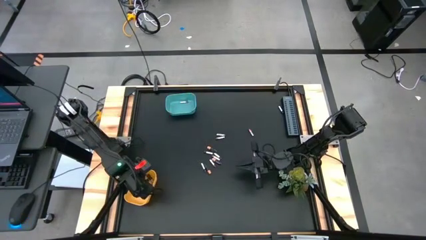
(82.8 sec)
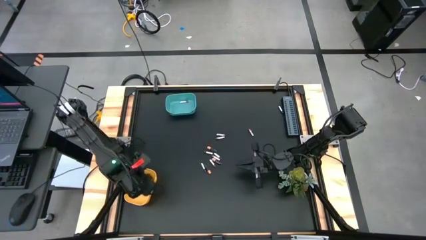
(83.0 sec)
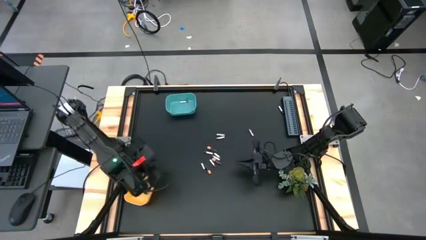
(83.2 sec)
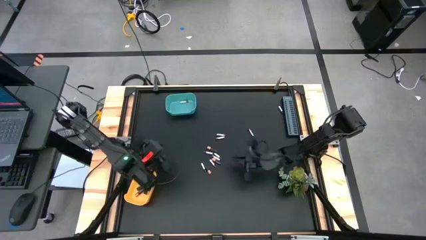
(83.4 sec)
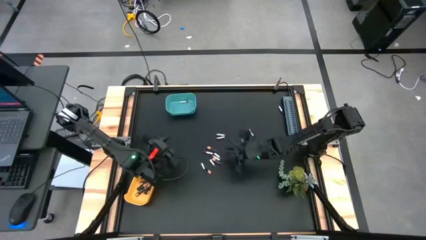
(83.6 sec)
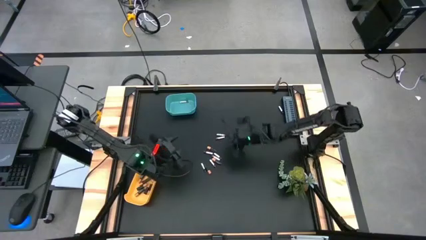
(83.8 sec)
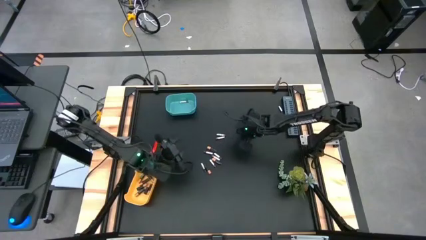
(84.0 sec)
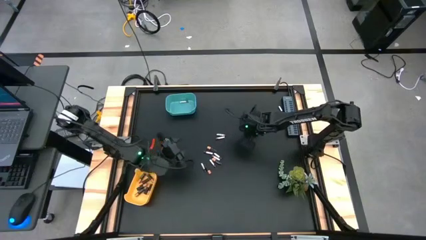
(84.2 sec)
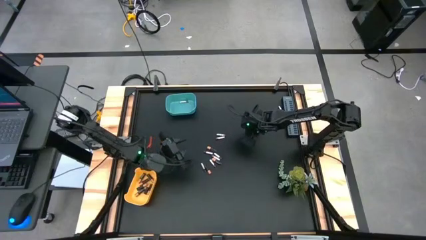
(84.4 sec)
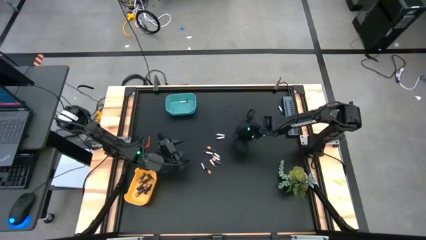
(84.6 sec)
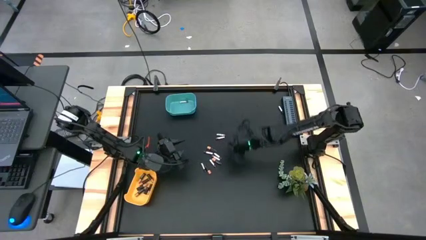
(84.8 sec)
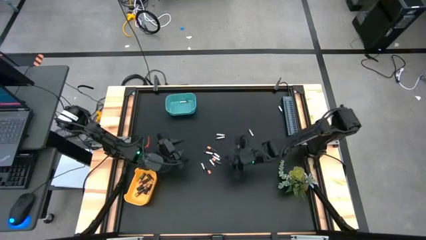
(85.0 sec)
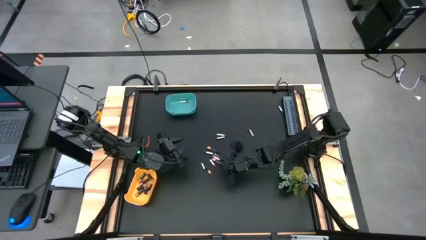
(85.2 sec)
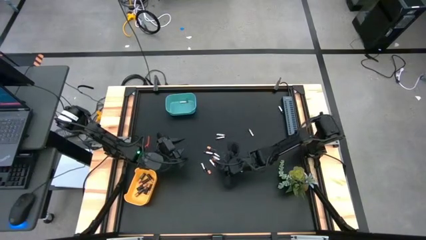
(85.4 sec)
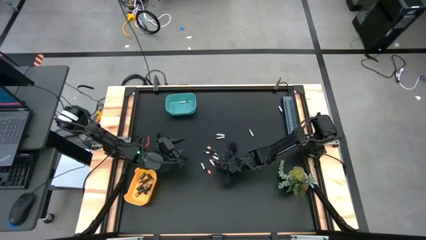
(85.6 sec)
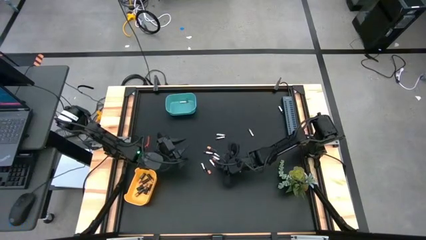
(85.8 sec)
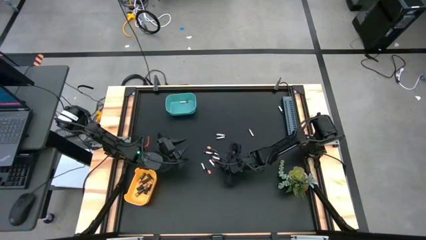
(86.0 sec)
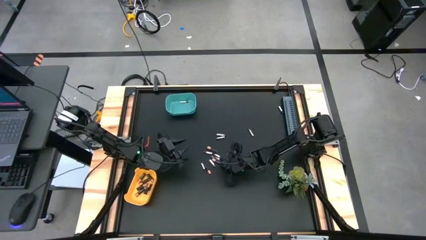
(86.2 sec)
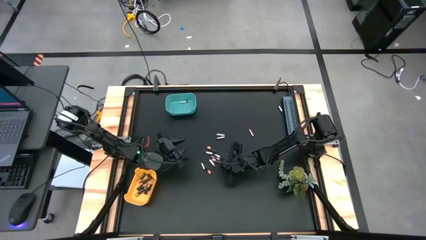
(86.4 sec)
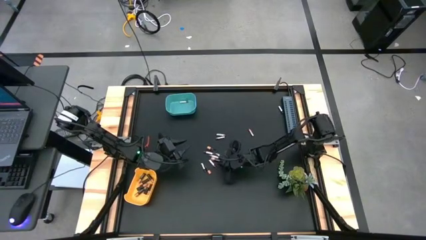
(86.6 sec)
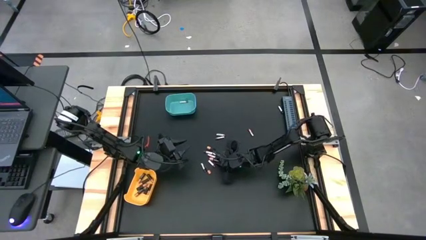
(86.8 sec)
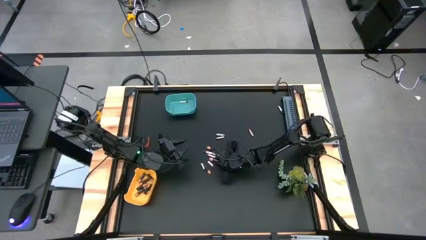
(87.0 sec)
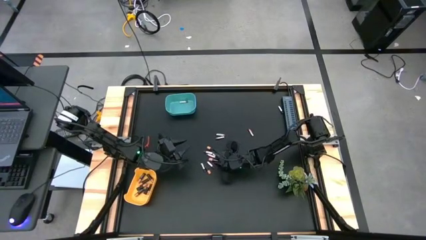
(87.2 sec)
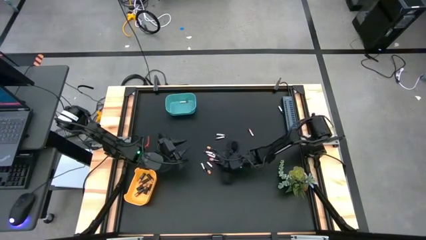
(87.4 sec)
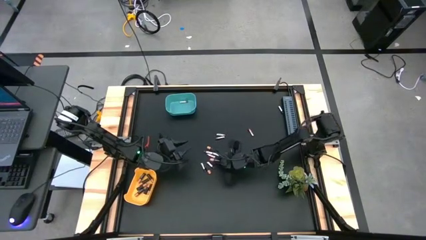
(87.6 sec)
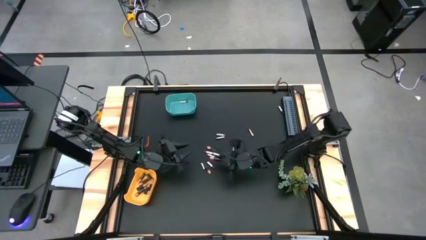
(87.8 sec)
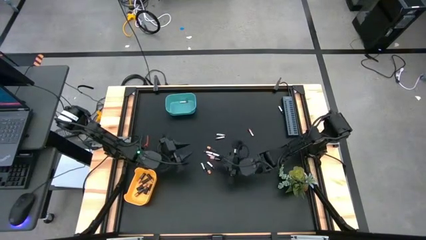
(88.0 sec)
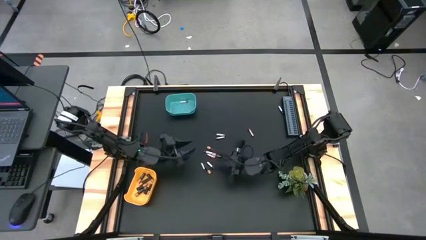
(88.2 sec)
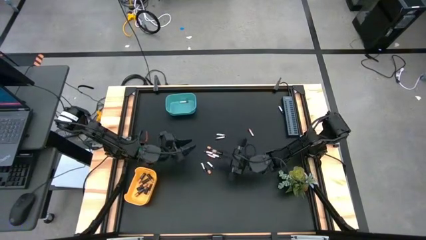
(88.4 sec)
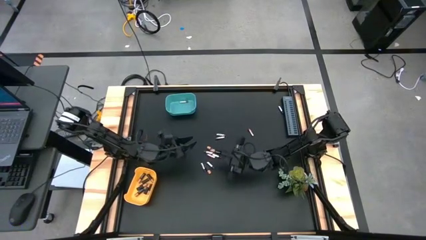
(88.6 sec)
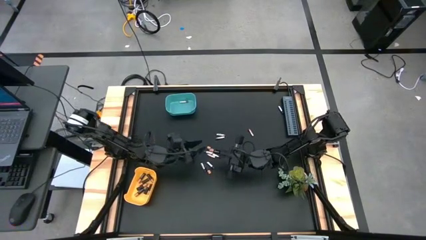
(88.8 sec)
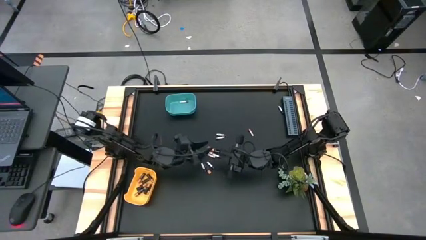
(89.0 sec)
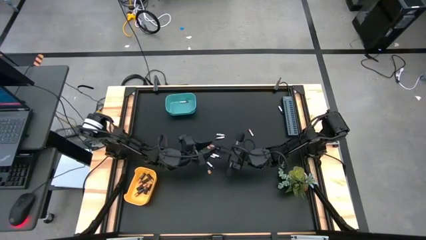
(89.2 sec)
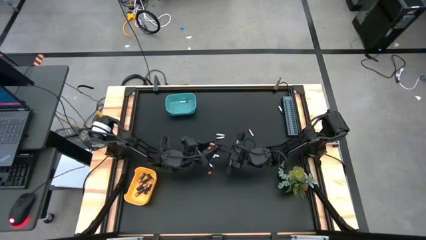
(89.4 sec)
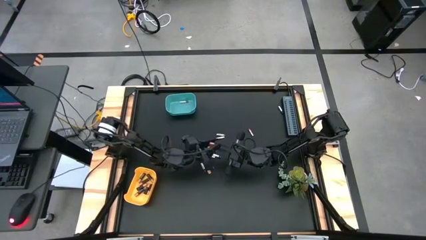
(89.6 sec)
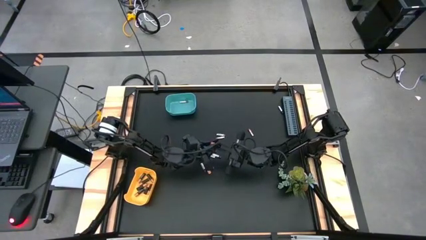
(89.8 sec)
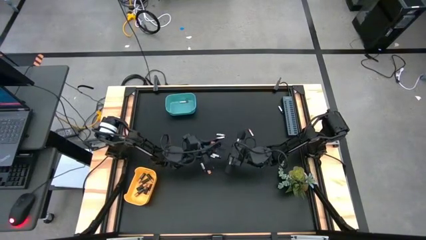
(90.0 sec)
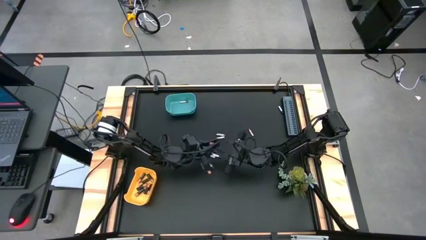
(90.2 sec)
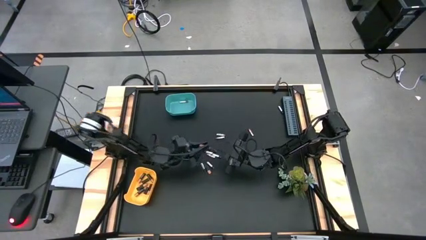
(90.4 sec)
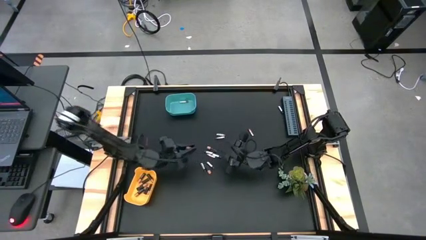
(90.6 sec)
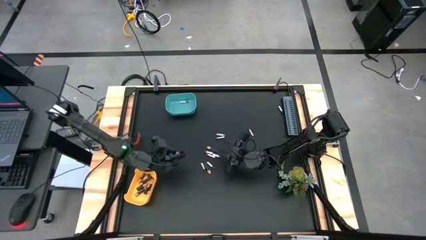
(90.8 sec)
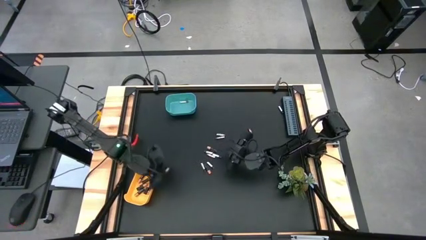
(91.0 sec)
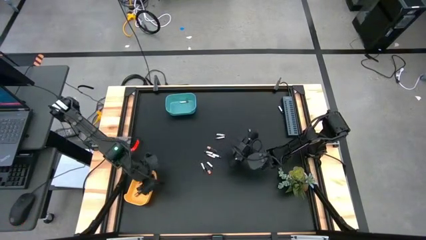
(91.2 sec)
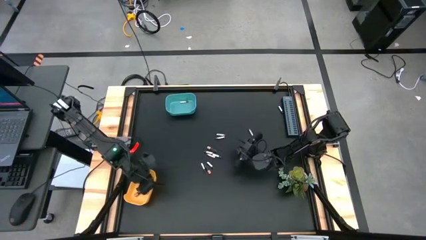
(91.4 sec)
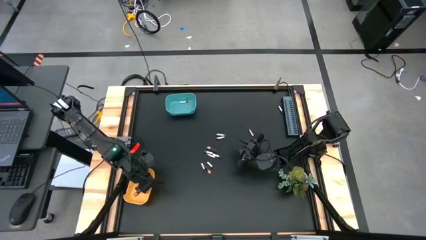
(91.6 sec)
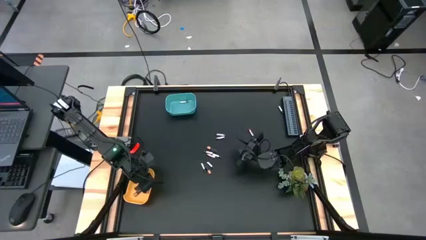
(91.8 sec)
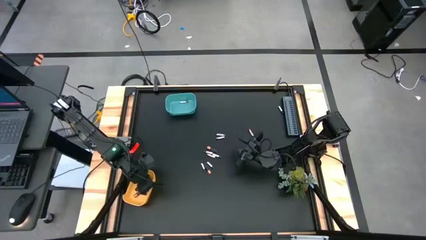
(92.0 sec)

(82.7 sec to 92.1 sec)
Task: Sort batteries
Put the black battery into the yellow bin

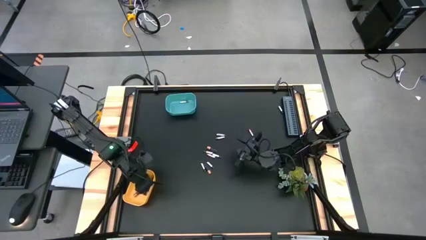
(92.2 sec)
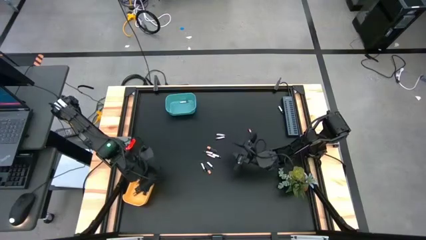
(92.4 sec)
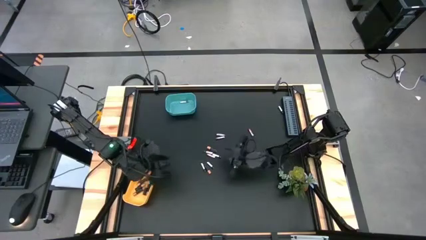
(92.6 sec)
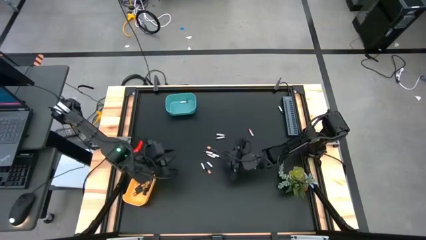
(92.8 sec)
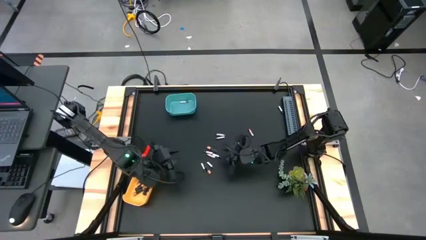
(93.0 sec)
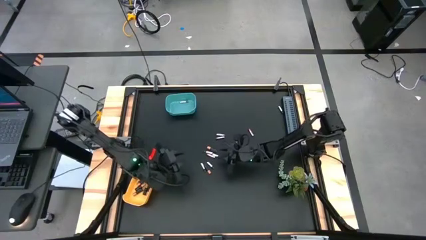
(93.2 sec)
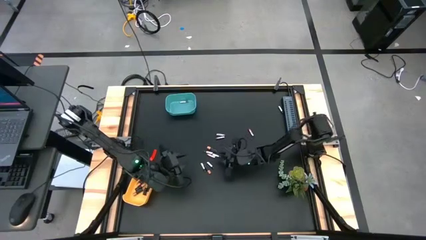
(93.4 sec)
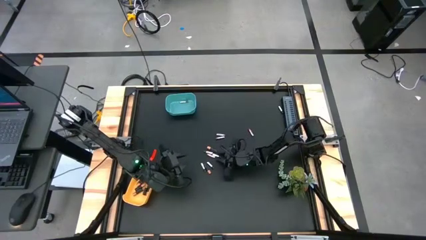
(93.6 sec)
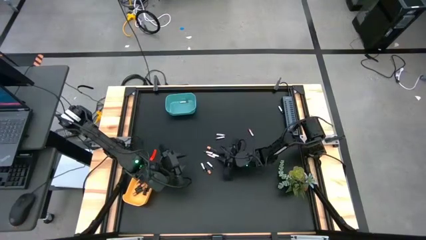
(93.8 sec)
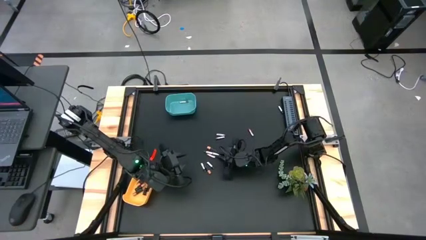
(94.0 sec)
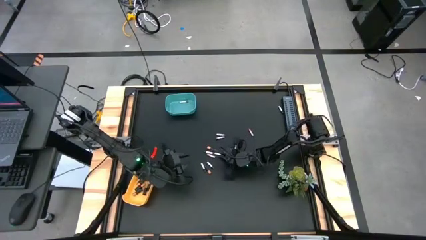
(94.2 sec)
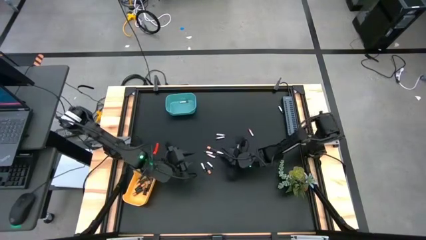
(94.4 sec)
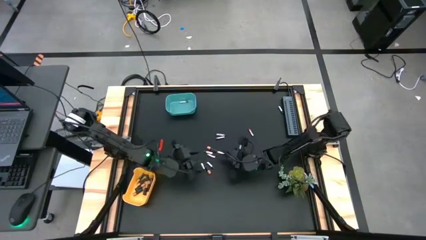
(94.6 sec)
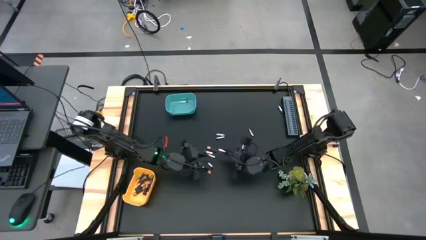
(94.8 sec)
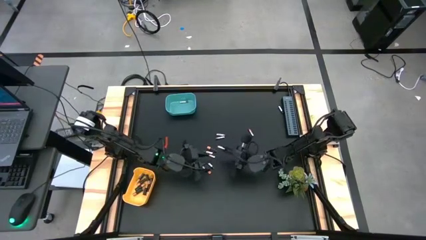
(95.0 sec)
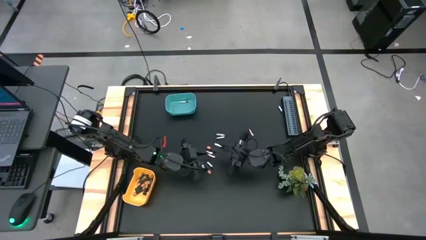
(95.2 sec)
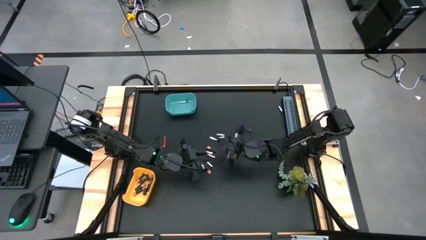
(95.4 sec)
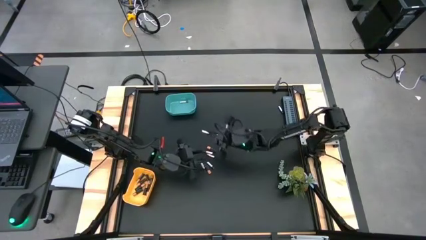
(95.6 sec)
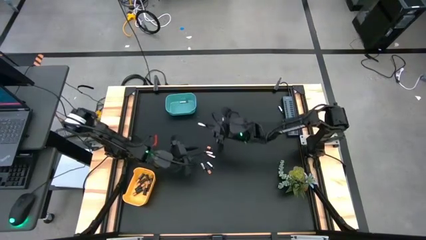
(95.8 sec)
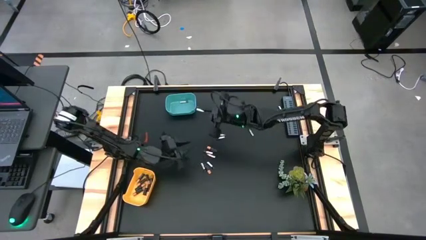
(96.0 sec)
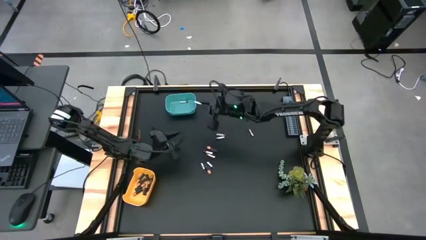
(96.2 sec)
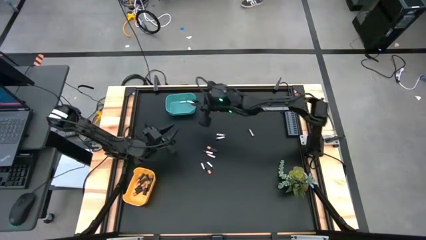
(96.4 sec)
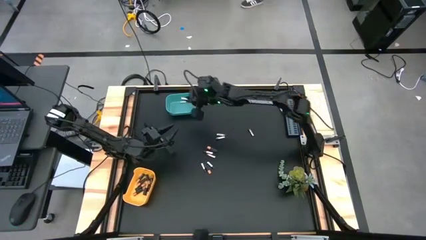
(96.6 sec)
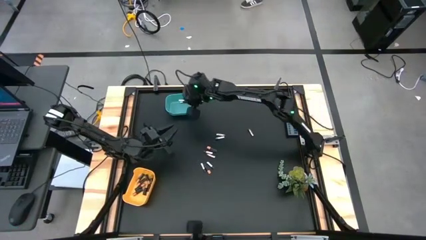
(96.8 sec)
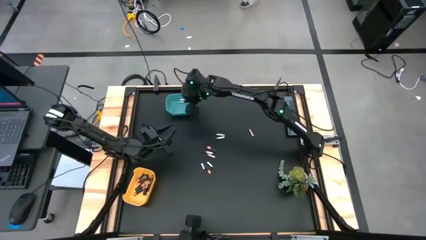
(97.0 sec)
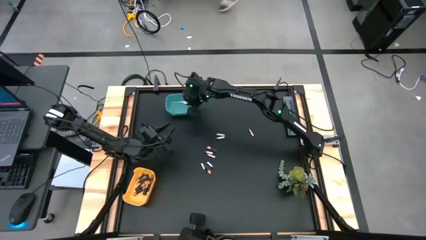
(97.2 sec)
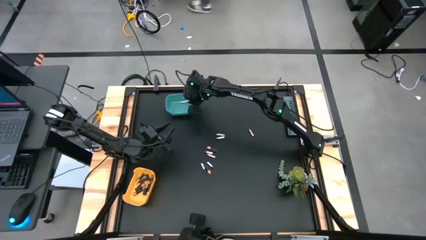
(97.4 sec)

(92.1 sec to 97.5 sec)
Put the silver battery into the green bin

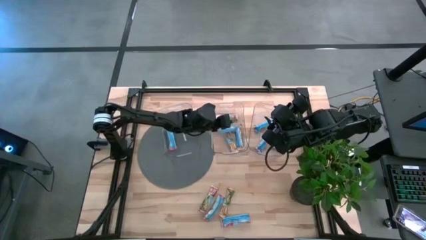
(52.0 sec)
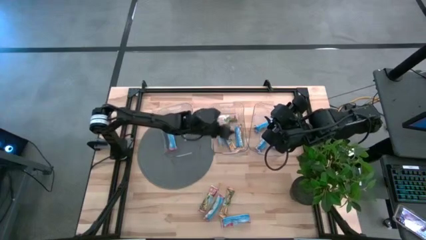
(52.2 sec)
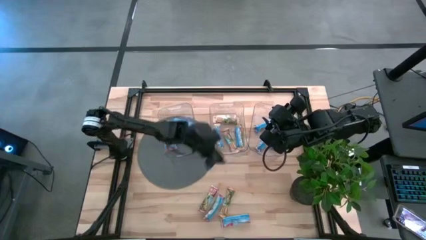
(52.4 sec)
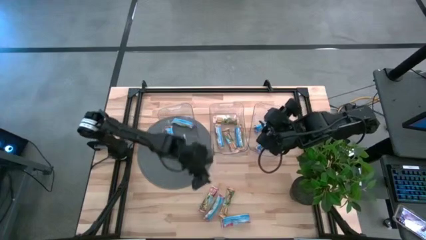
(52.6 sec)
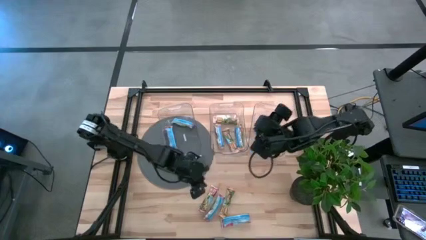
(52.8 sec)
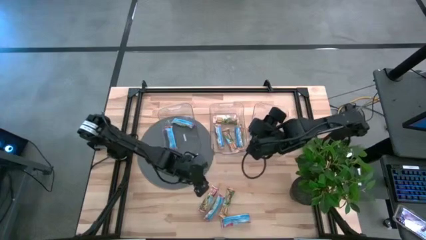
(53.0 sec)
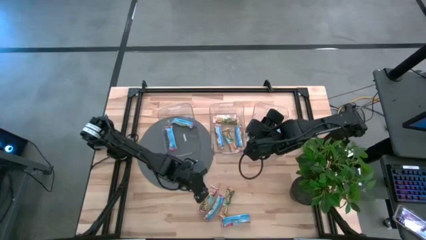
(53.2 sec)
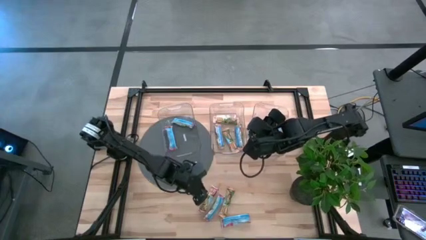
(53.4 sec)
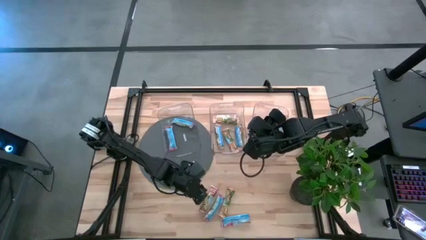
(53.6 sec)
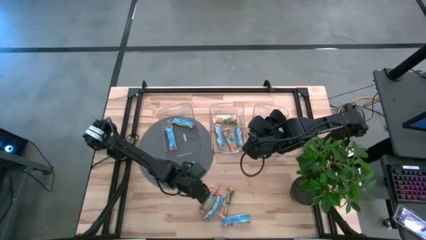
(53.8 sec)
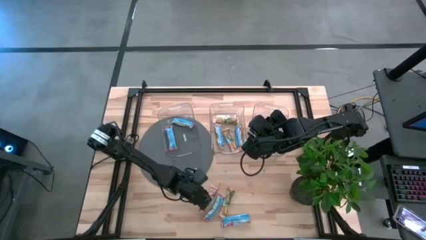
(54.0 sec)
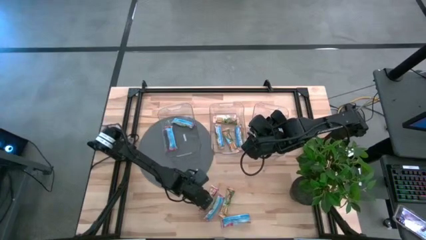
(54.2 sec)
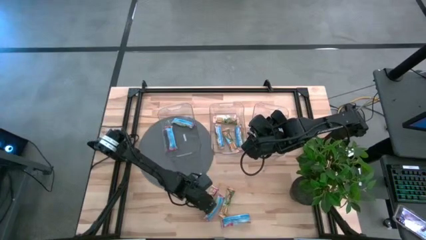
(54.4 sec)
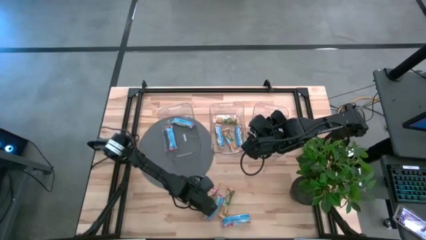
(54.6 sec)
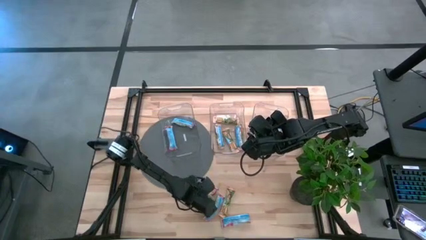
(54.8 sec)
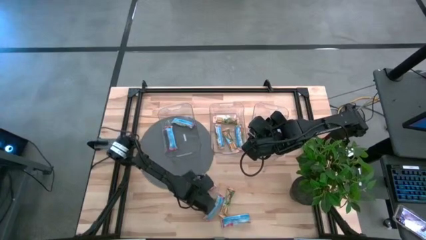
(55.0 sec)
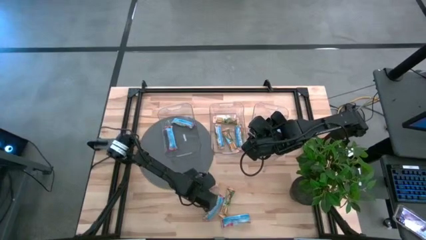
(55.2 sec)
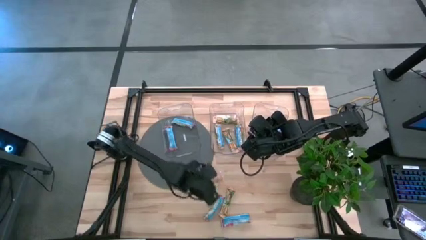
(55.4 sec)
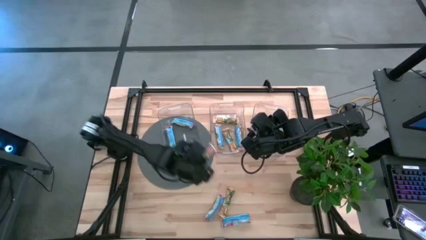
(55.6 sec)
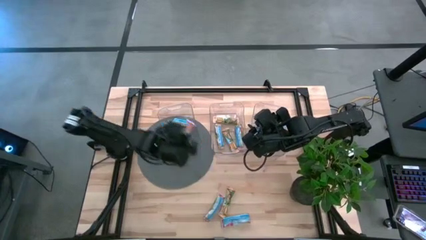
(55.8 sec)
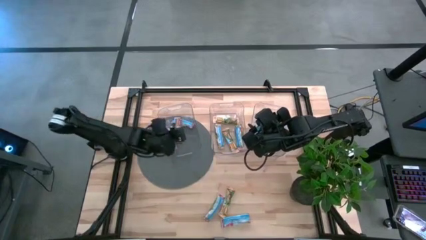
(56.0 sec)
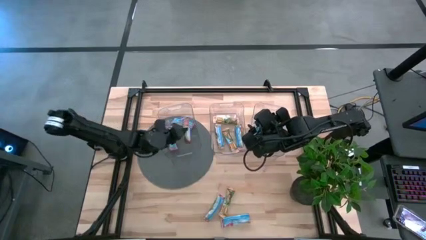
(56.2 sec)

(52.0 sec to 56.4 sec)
Task: Pick and place Granola Bars by type
Put the red granola bar into the left transparent bin
